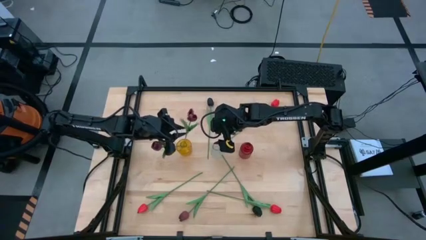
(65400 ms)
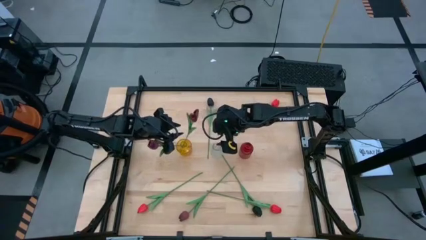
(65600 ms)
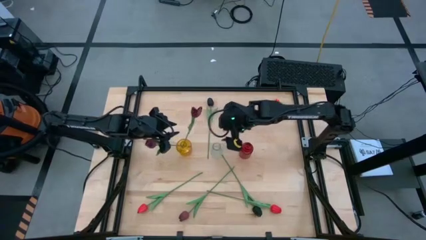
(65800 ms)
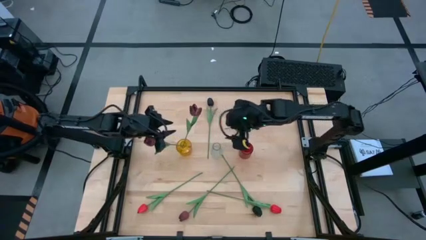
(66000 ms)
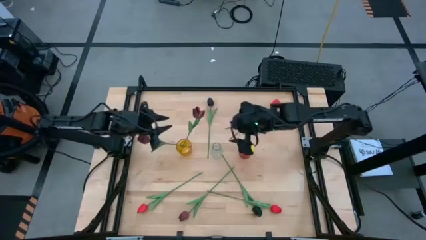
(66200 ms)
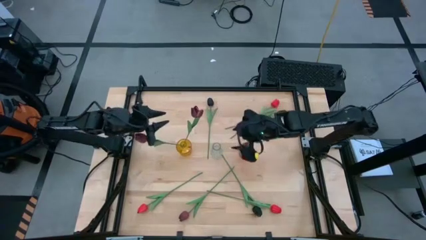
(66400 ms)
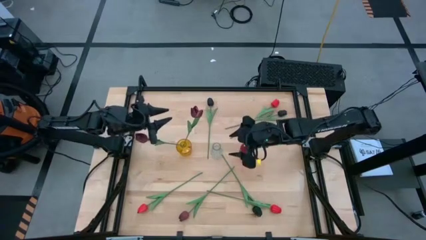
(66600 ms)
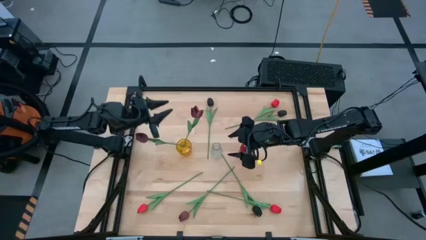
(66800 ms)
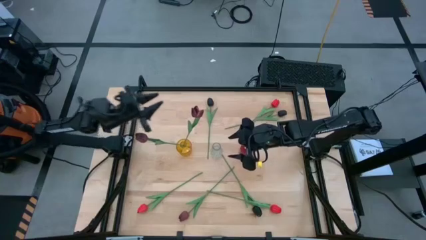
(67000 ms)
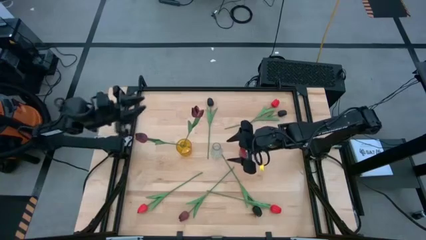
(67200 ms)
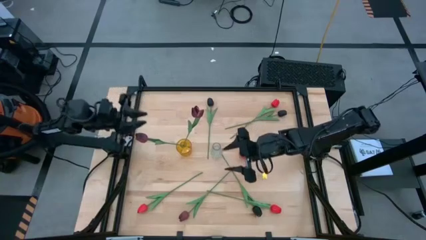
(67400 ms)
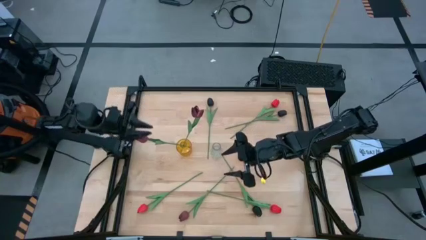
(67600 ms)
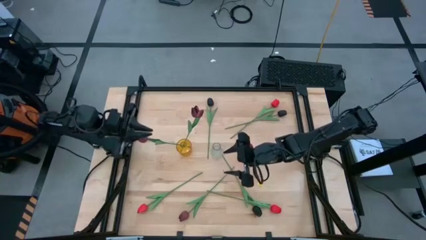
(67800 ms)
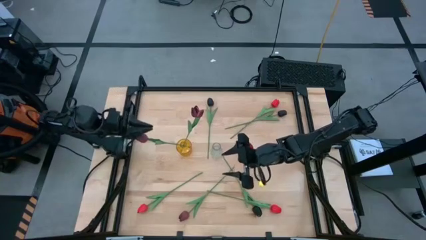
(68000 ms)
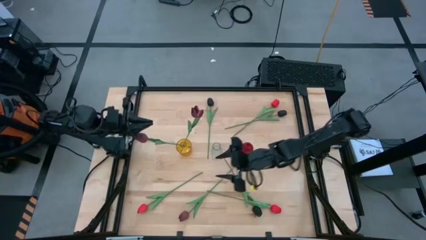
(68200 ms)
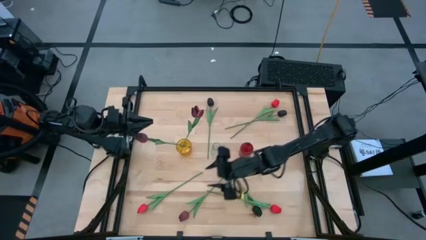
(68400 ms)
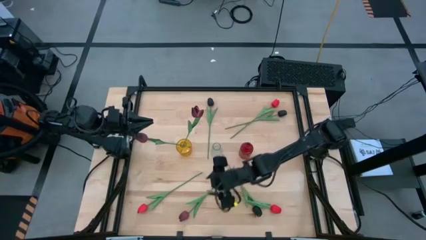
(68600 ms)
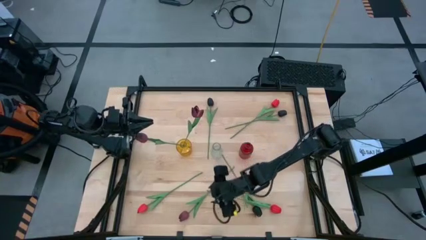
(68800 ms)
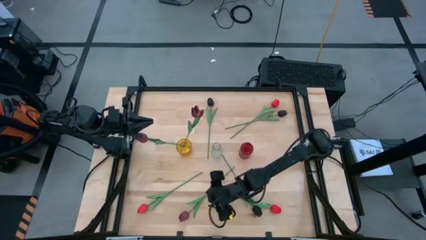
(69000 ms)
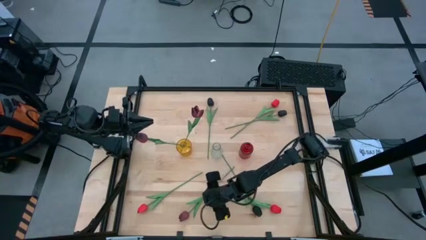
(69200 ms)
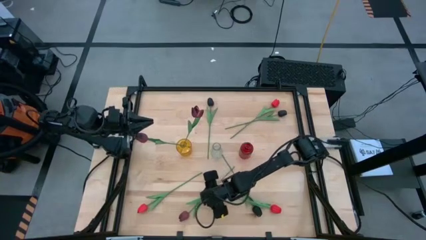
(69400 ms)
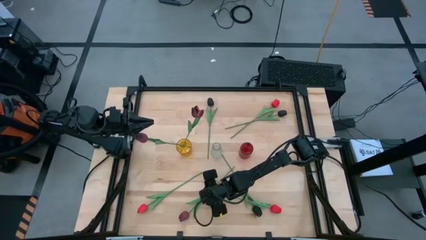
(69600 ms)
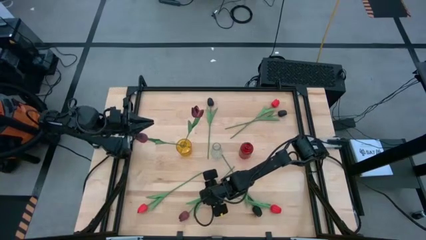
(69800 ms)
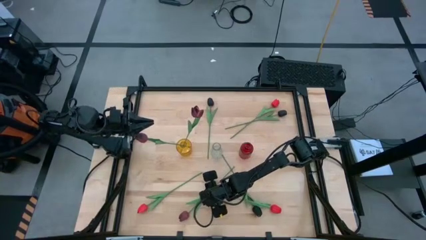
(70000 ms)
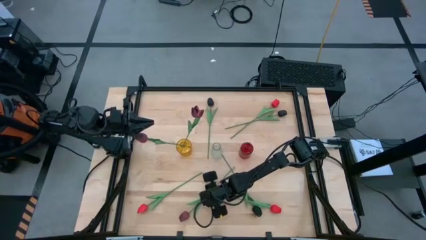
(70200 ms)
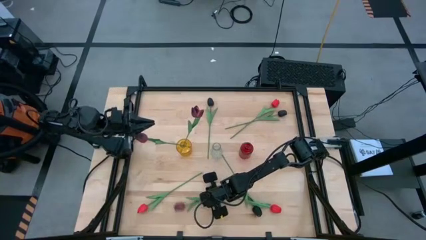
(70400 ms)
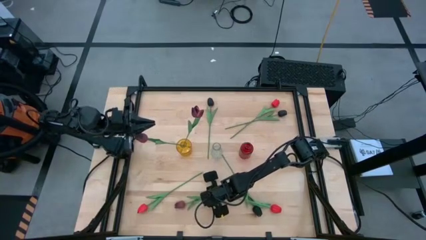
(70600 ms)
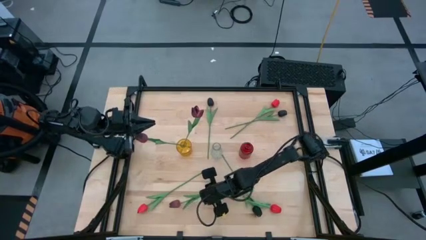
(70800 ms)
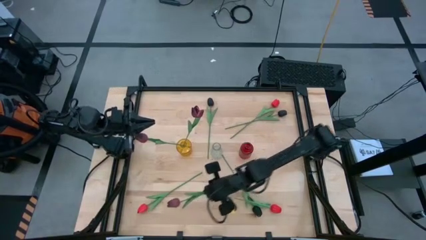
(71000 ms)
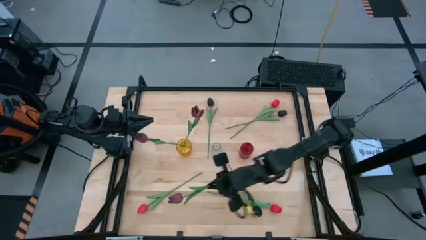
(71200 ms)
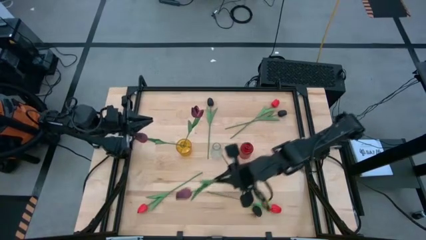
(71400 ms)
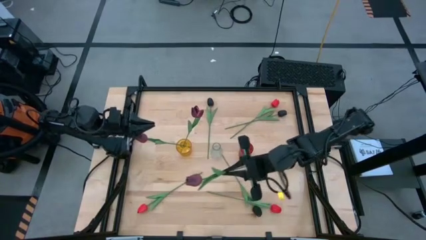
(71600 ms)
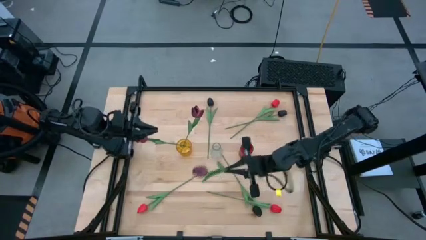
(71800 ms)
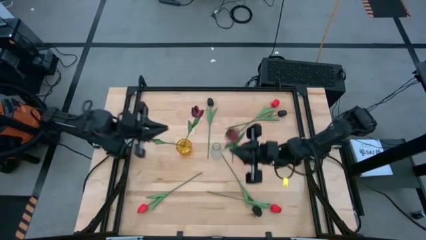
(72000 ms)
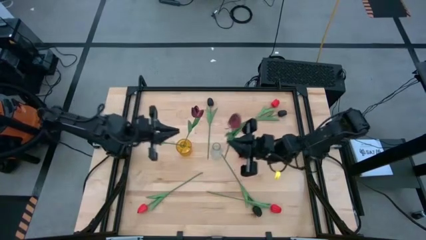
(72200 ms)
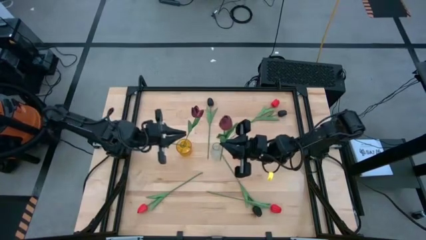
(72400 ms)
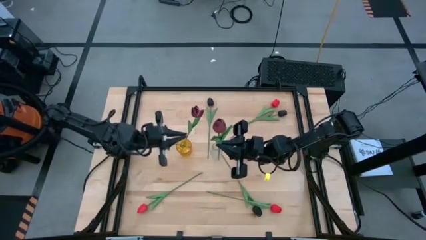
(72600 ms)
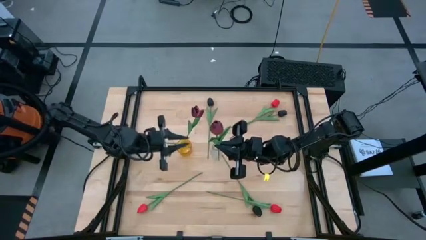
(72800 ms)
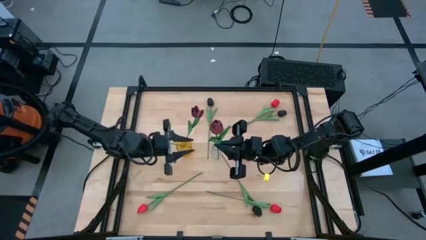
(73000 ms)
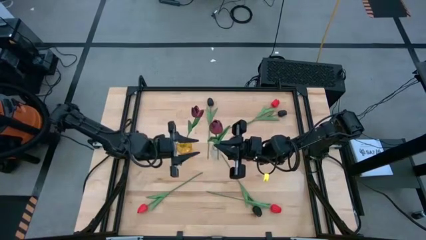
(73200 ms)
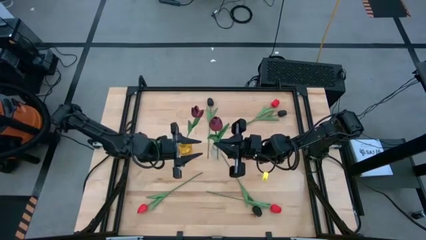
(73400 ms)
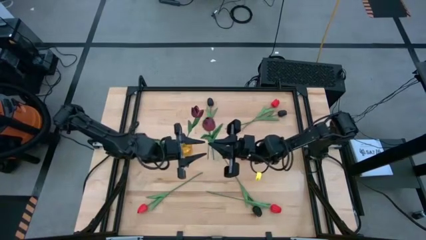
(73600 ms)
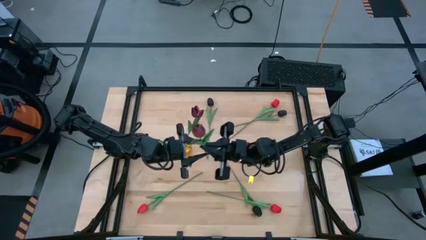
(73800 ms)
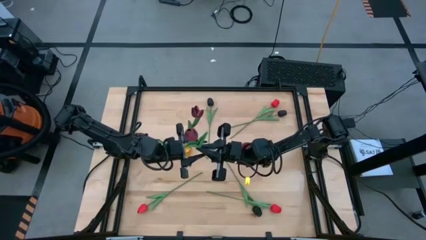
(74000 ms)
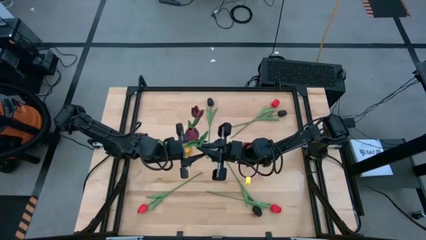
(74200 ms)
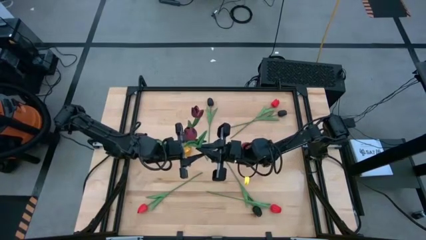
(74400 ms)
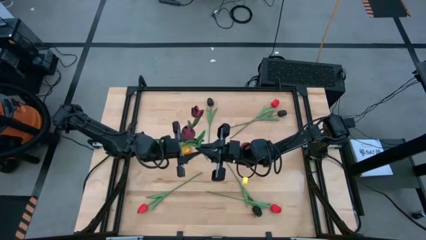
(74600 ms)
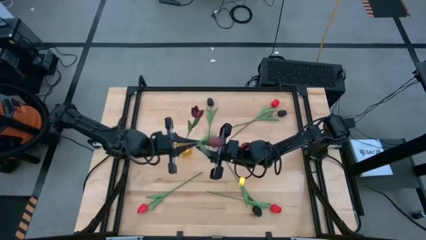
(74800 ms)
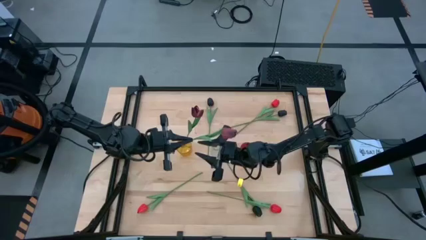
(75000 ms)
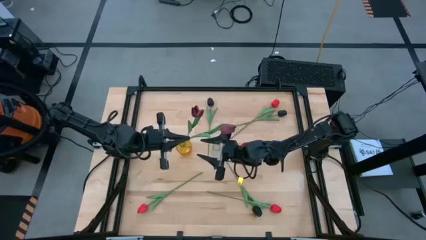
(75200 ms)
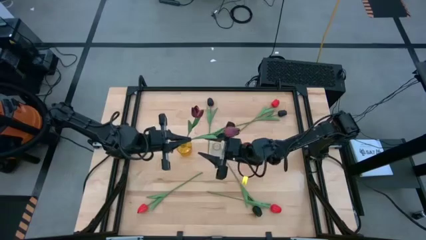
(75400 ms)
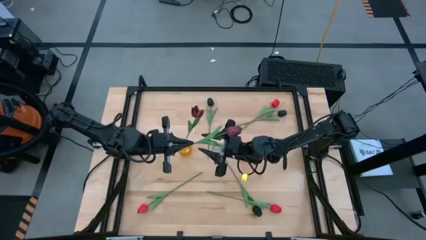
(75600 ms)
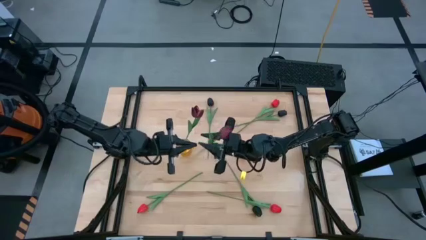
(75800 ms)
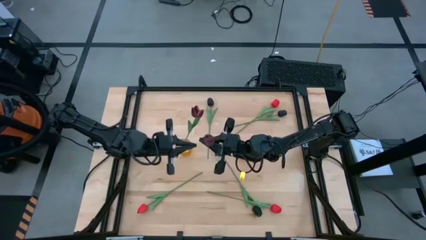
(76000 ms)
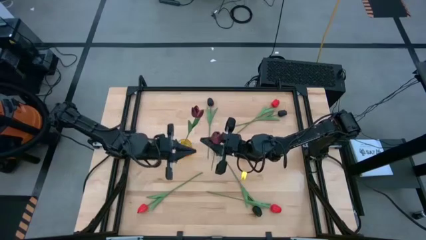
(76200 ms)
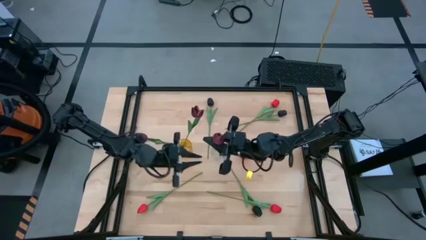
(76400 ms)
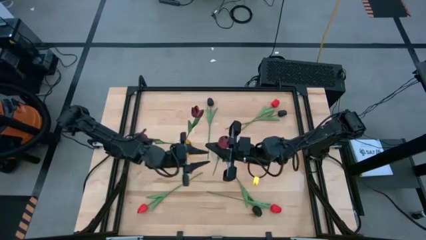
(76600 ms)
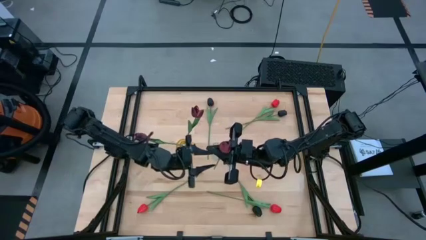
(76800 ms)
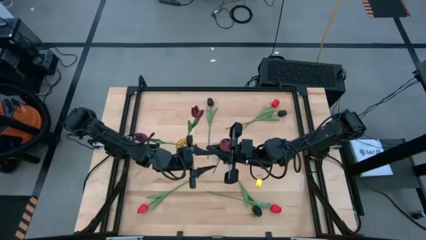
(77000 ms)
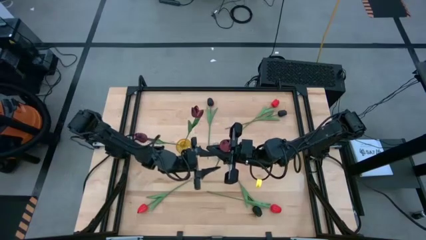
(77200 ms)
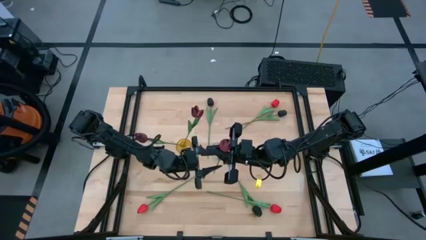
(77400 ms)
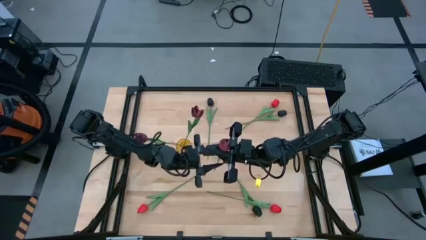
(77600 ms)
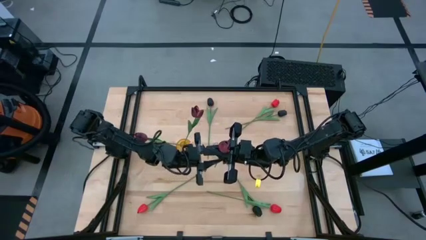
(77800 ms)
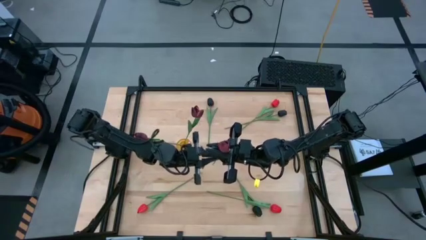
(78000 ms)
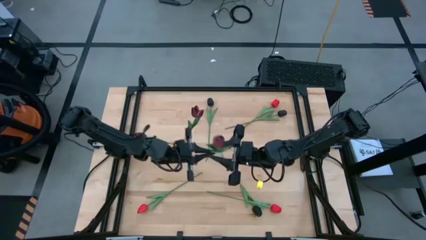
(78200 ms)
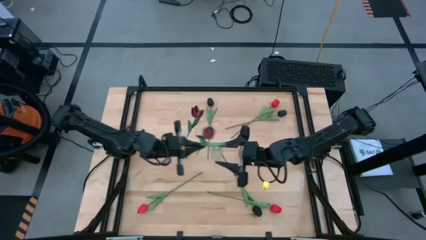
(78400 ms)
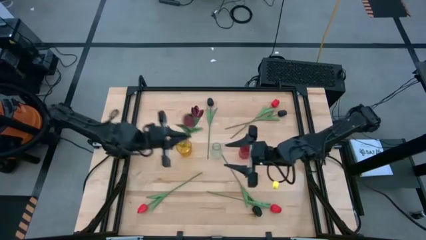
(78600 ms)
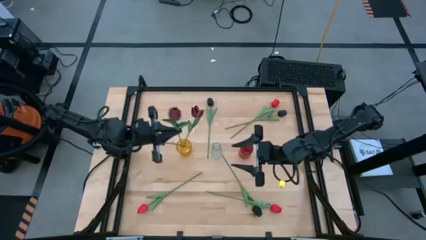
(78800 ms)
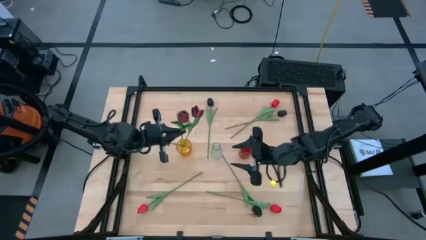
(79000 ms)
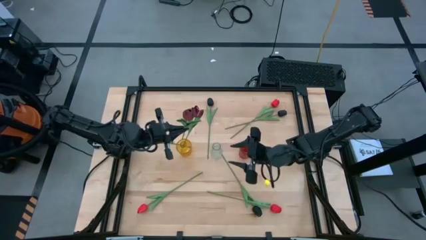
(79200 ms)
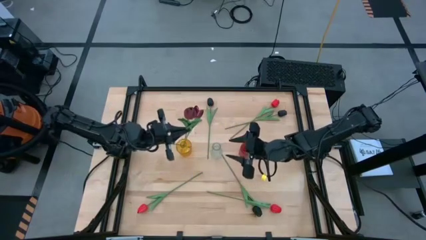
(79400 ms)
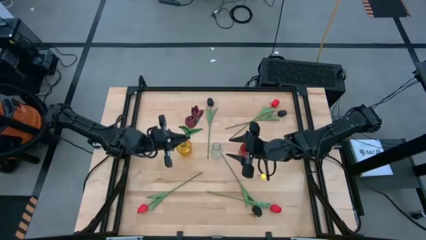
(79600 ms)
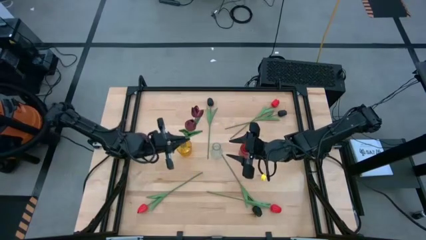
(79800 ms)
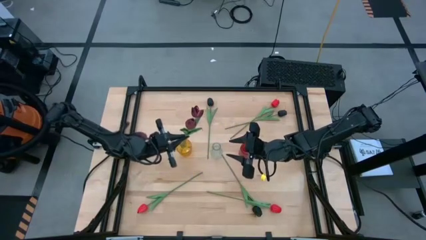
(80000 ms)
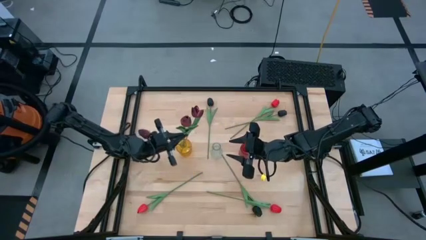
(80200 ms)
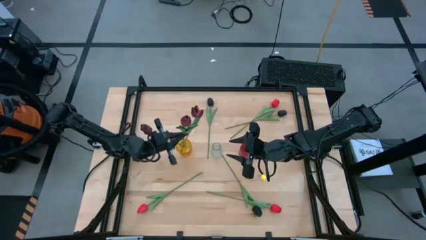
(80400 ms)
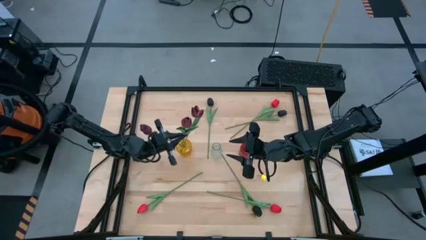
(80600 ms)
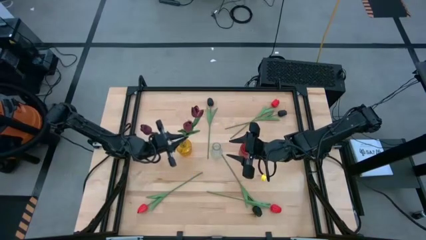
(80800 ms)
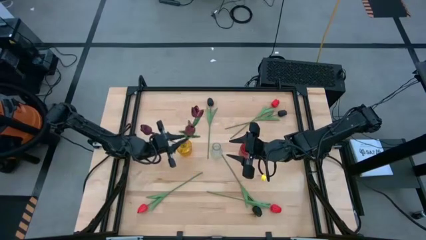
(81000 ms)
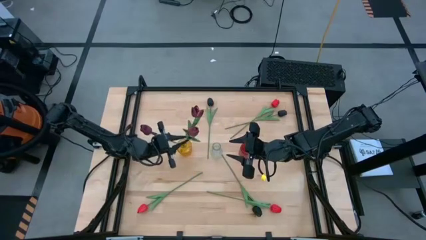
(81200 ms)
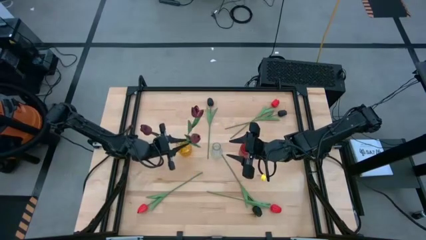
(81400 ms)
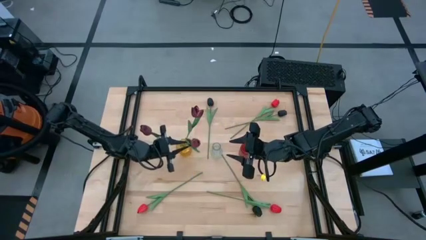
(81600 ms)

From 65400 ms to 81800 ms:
Task: Sort flowers into vase by color
Put the red tulip into the yellow vase
